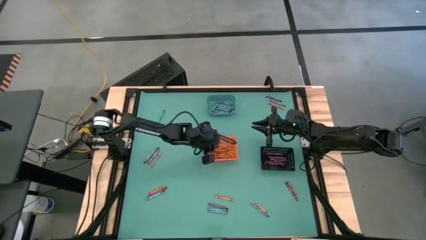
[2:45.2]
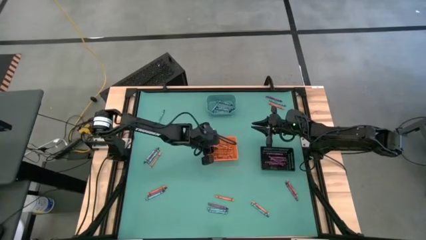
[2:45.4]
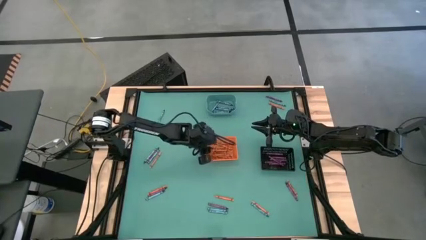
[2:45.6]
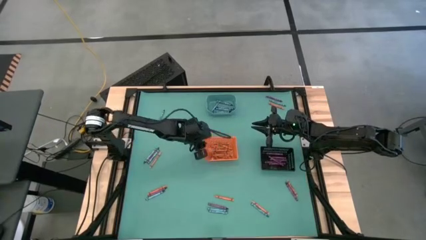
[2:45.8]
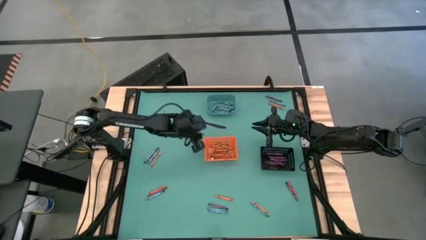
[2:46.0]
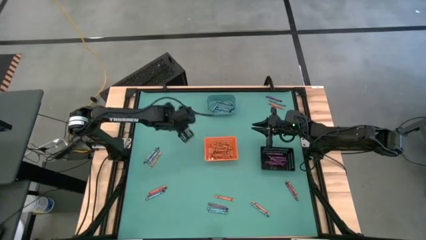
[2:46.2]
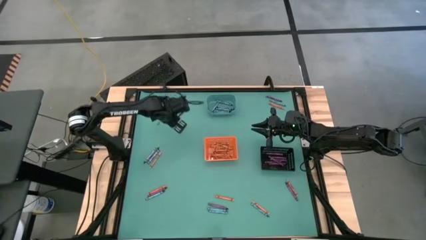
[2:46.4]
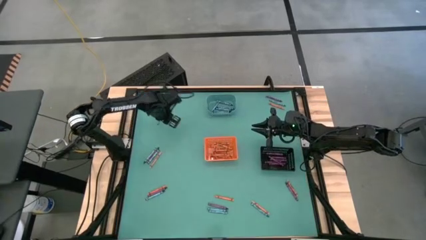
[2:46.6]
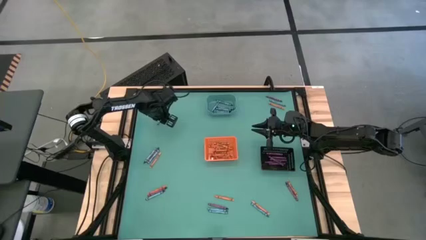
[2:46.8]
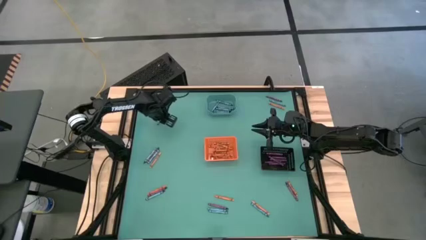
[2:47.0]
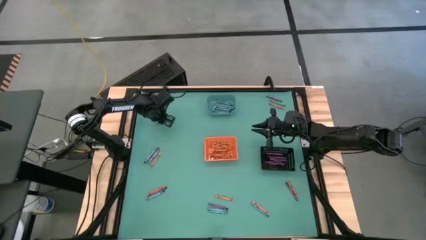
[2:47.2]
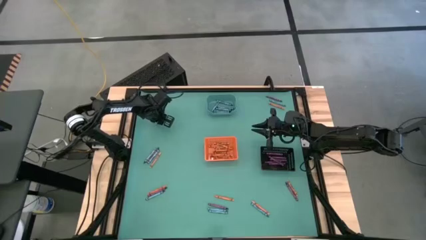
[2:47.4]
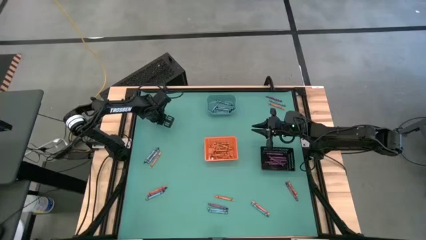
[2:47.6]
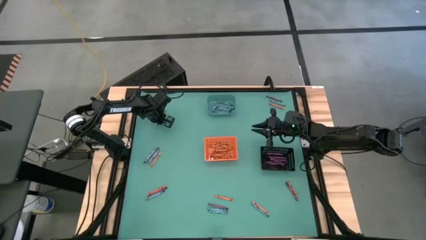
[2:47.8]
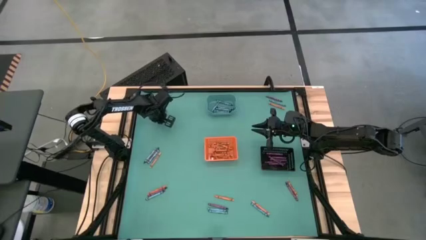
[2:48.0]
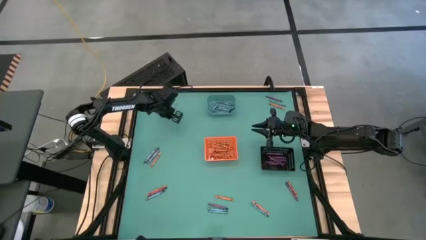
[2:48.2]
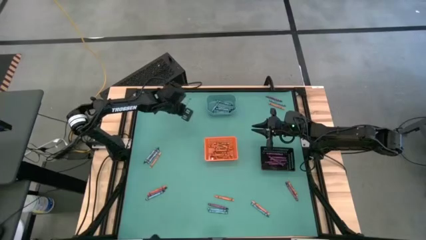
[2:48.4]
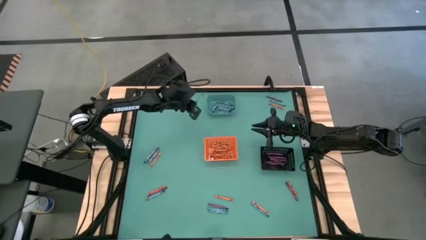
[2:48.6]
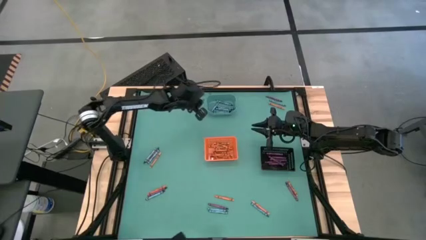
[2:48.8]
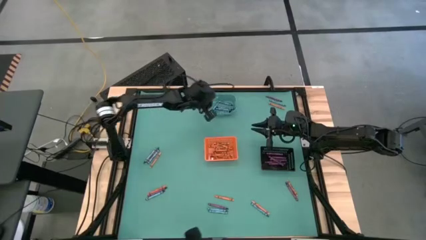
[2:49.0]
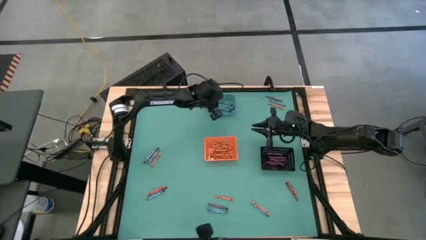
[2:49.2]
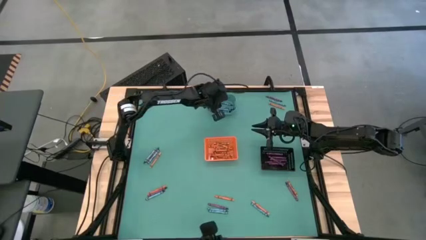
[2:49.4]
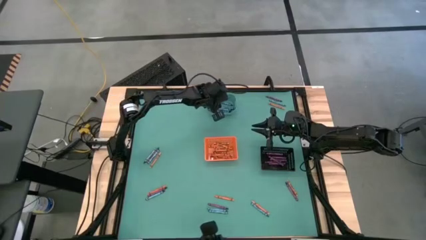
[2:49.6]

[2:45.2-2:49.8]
Task: Sort crayons
Put the blue crayon into the blue bin

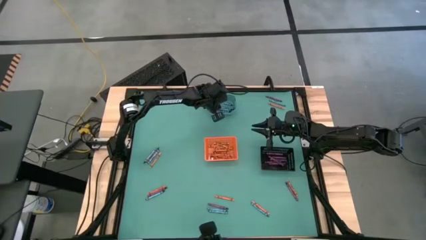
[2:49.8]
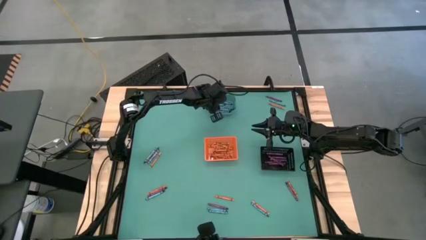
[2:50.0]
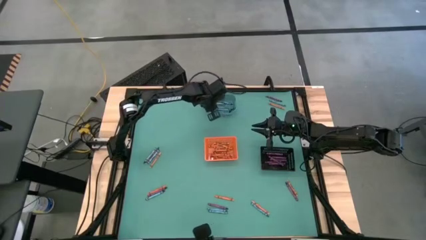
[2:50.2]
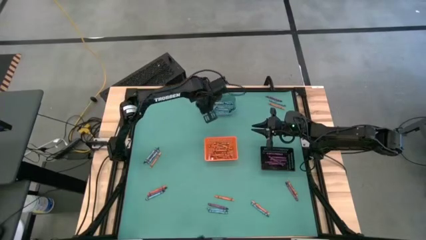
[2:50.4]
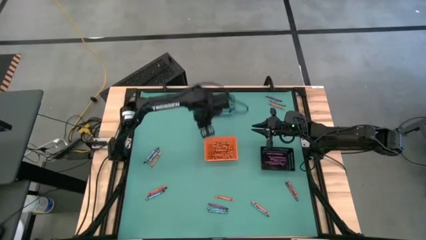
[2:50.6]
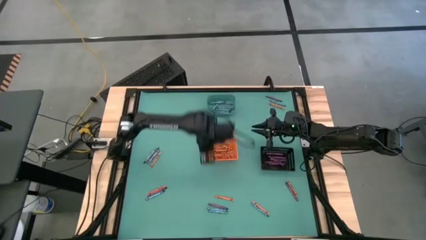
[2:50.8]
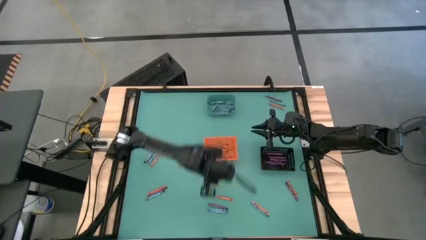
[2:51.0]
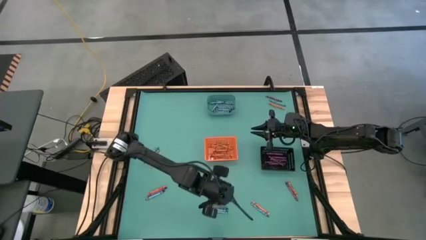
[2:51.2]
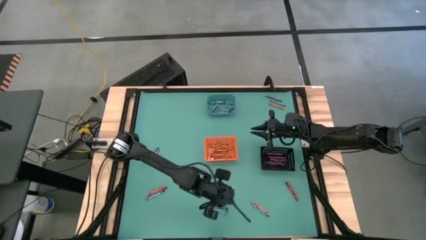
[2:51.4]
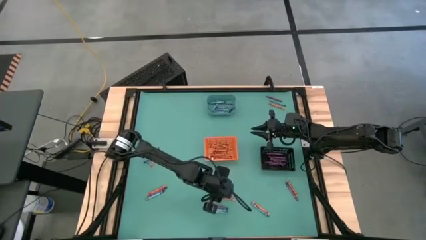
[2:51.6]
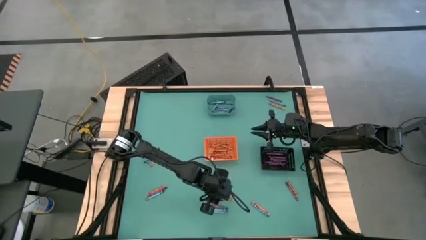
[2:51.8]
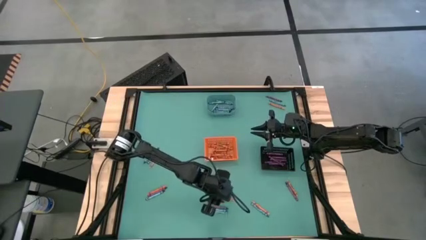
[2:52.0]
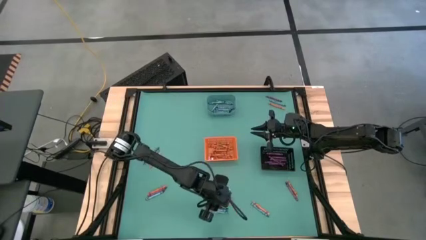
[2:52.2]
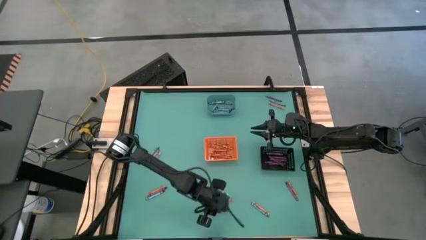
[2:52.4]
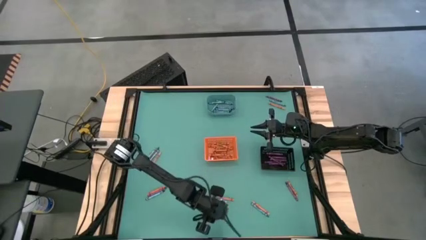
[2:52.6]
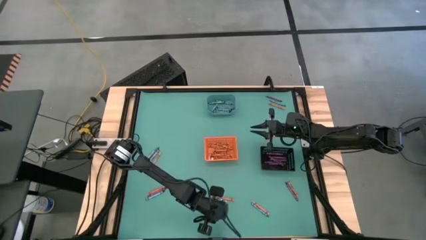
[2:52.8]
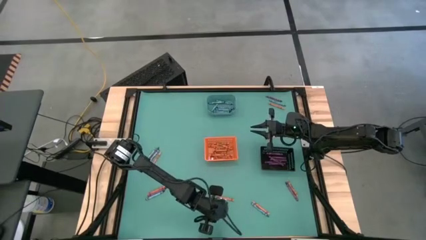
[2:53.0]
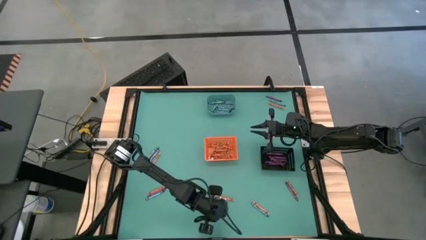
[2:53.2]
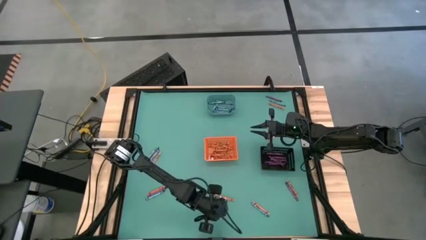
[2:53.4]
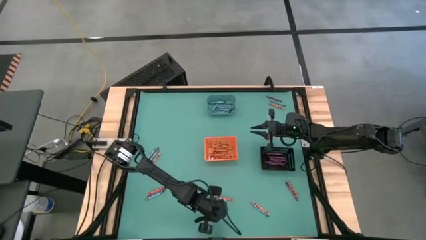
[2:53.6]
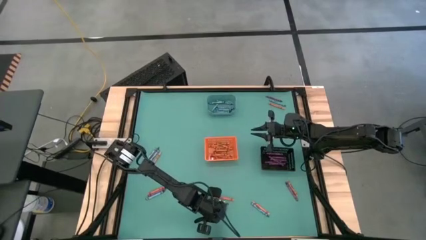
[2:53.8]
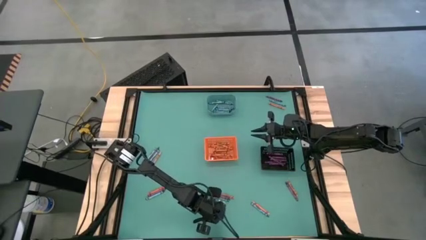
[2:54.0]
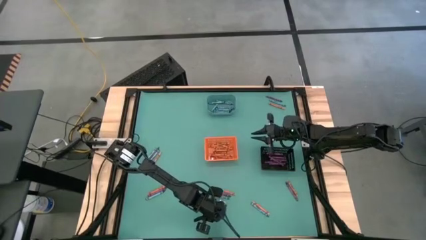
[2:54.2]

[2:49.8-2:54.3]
Put the green crayon into the blue bin

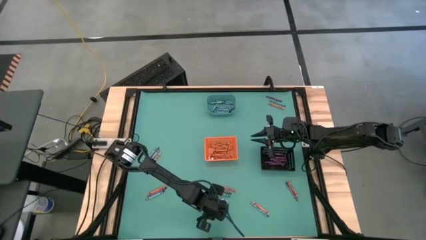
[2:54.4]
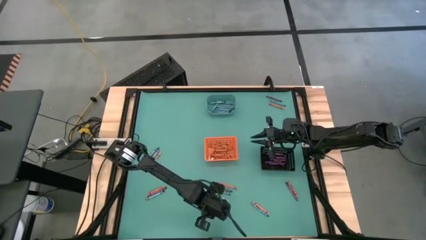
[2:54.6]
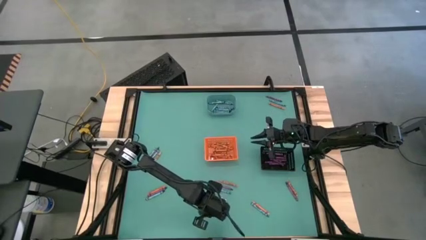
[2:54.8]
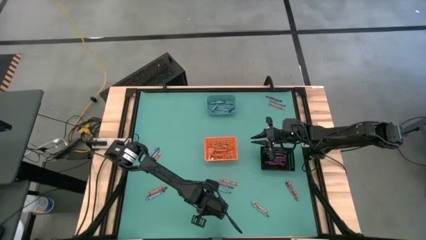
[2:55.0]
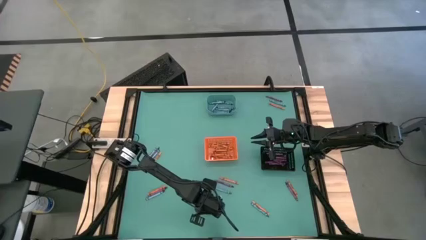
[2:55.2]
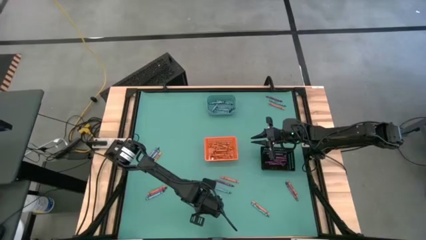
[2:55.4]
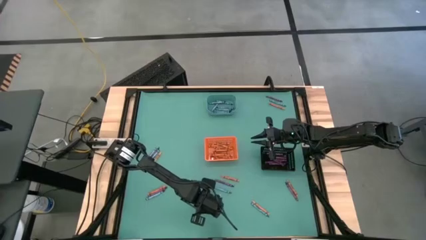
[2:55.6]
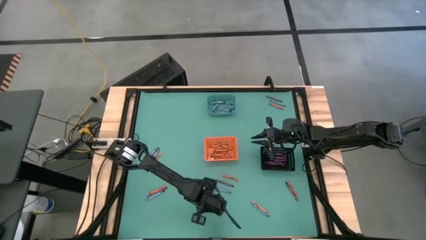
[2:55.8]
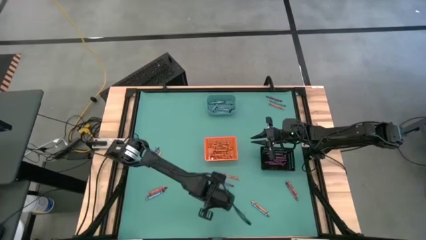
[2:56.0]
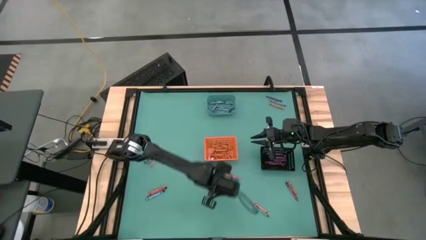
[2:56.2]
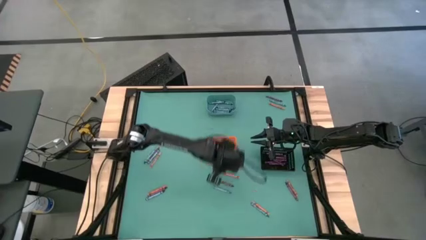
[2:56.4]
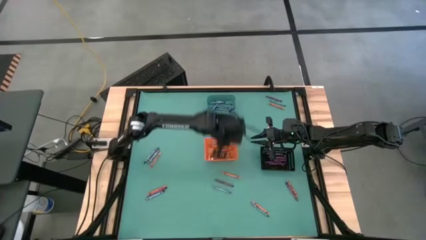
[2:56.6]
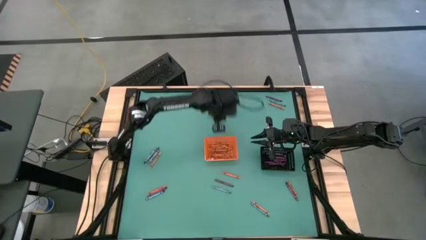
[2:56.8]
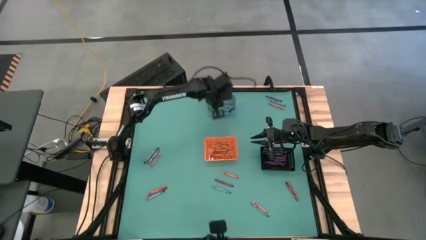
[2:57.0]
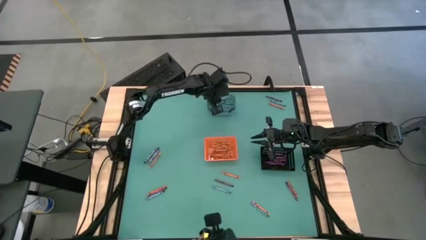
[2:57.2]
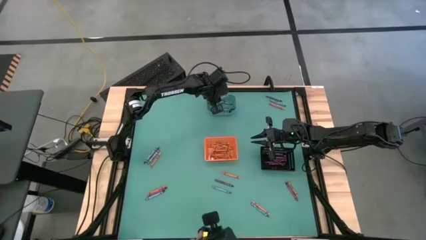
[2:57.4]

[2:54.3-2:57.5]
Put the blue crayon into the blue bin

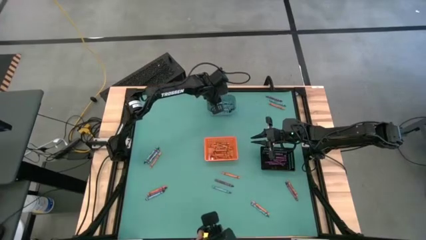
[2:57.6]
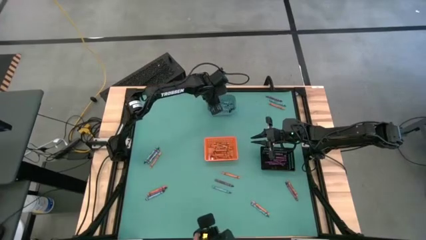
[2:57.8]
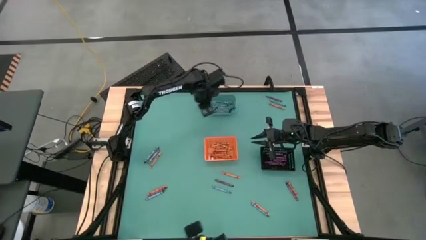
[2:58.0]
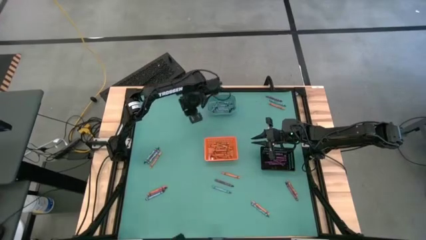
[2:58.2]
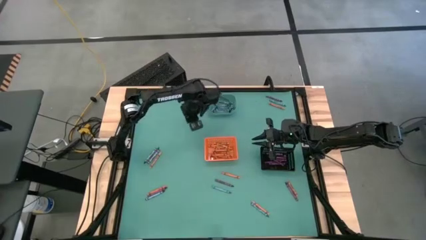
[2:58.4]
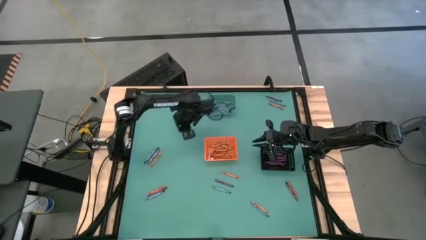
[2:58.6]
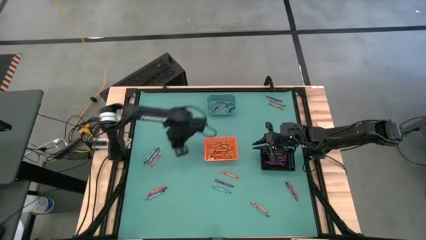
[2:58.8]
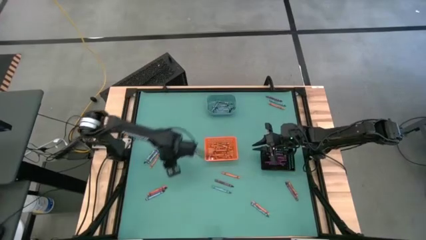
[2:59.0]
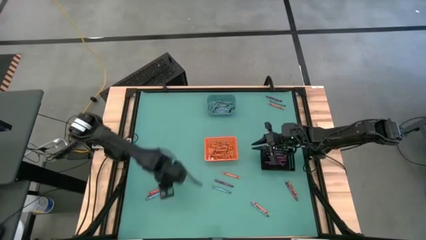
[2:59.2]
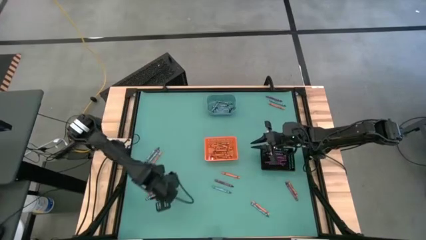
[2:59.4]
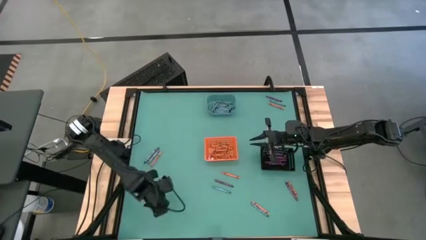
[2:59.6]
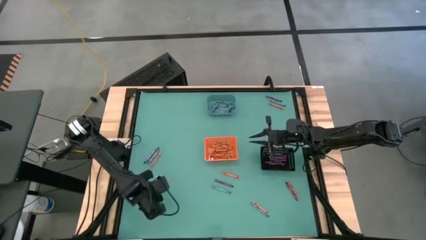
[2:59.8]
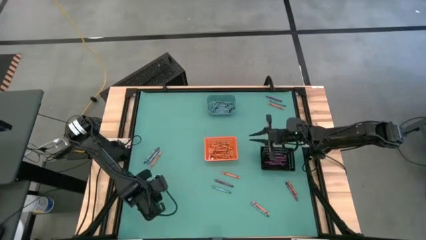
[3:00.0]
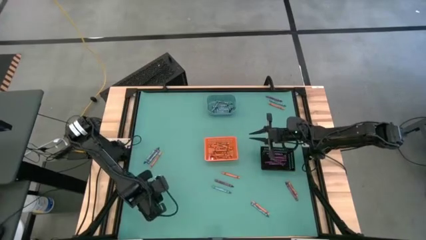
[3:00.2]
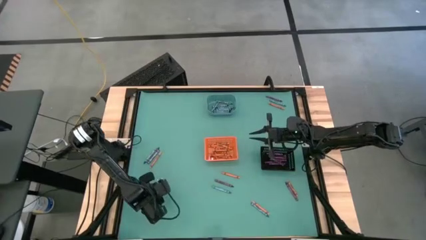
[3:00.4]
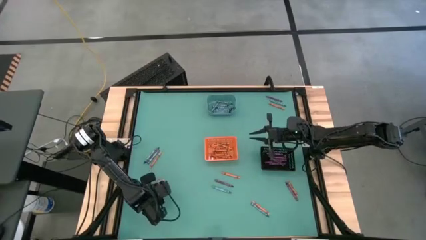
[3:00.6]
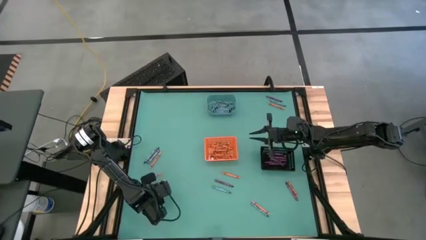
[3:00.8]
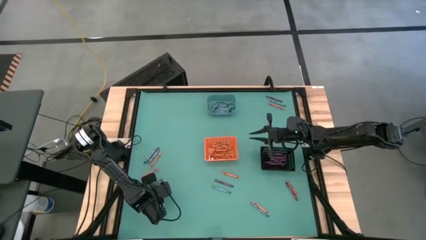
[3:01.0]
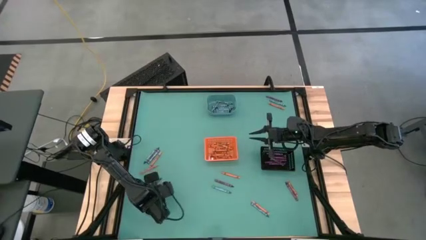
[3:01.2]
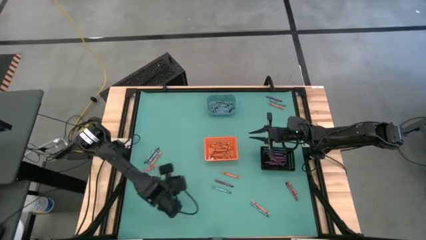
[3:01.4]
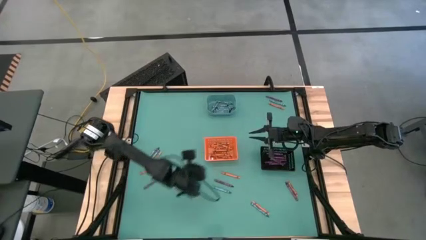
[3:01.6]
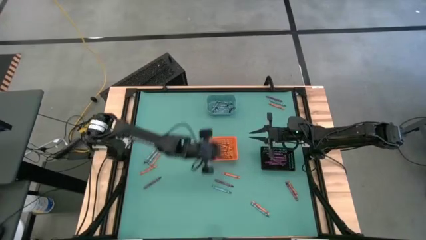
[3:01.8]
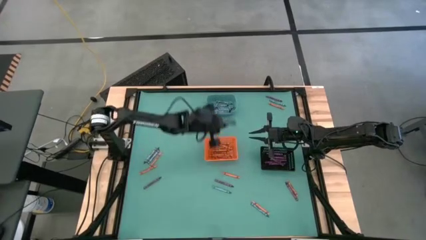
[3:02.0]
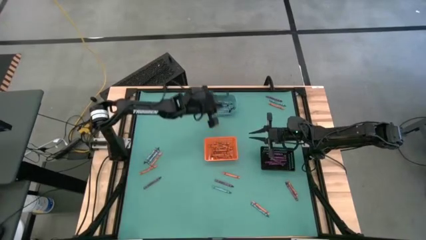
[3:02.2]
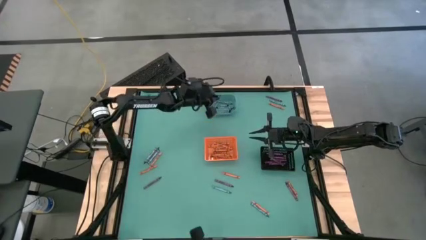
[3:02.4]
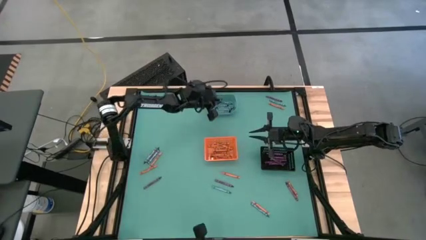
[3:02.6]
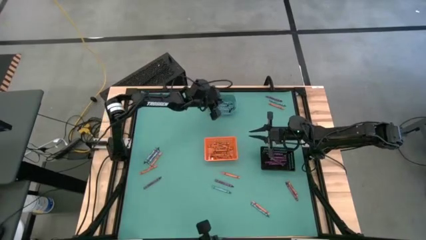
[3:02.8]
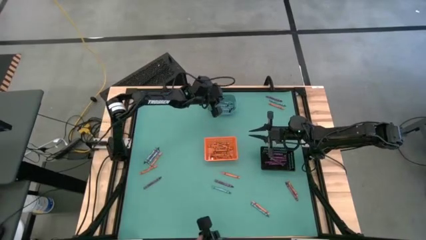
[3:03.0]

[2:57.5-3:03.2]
Put the blue crayon into the blue bin
